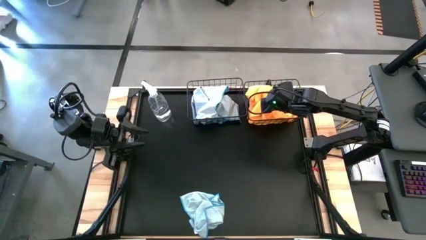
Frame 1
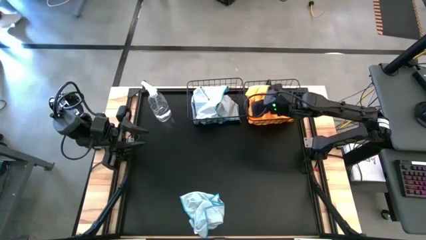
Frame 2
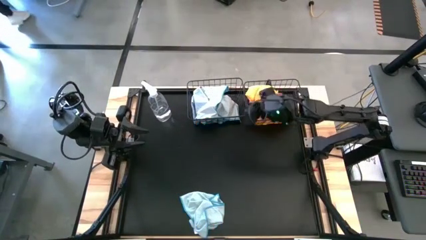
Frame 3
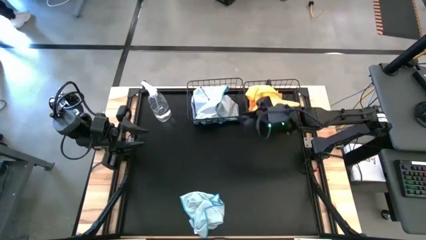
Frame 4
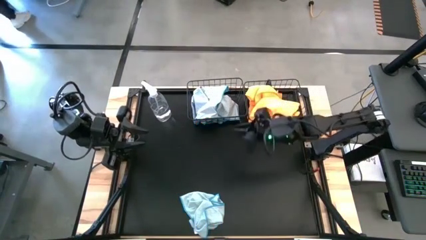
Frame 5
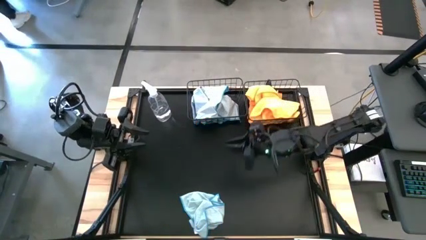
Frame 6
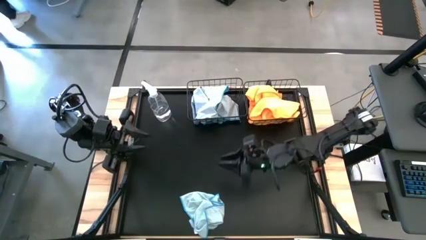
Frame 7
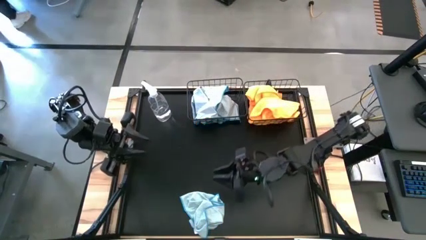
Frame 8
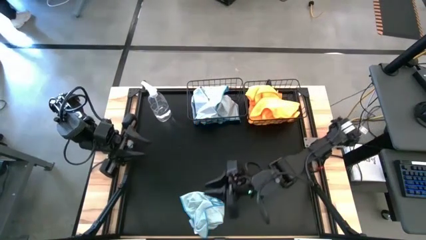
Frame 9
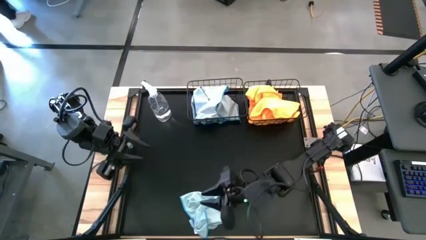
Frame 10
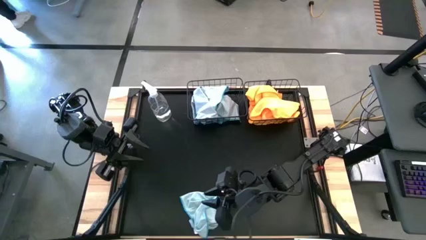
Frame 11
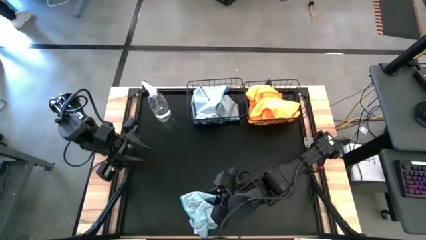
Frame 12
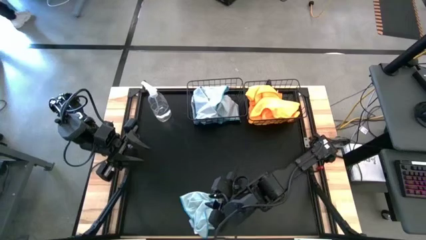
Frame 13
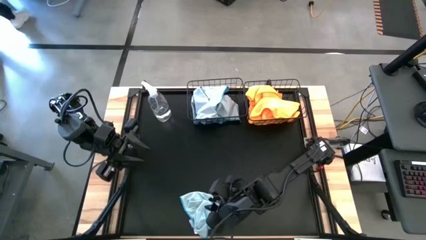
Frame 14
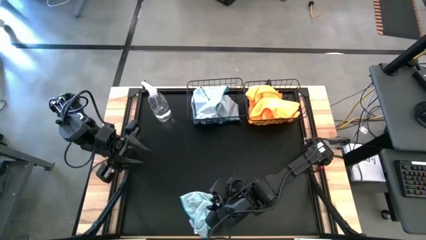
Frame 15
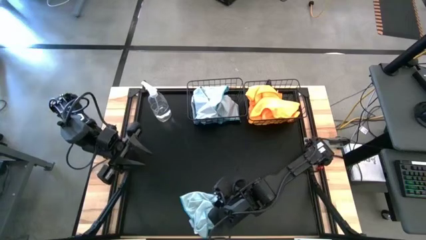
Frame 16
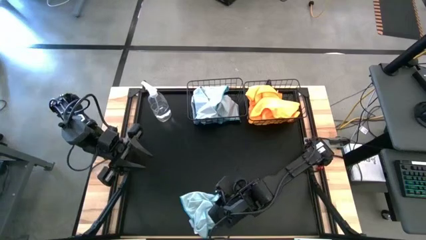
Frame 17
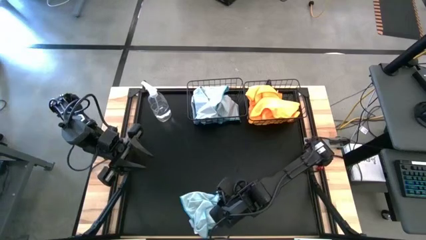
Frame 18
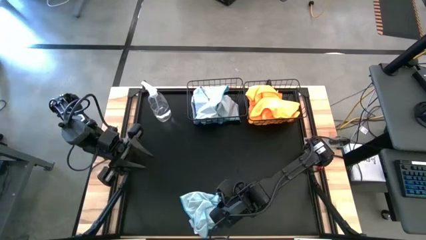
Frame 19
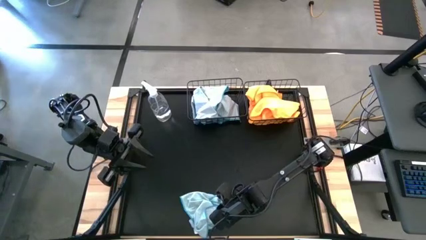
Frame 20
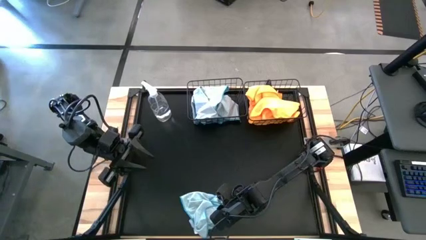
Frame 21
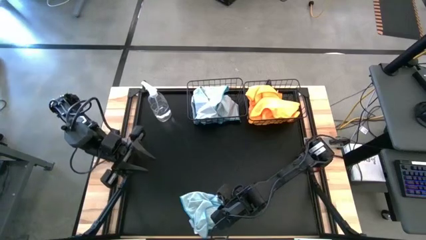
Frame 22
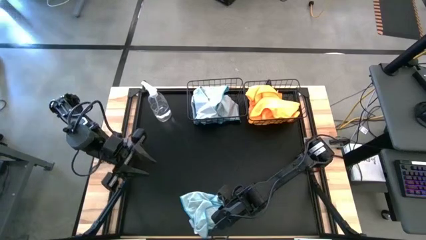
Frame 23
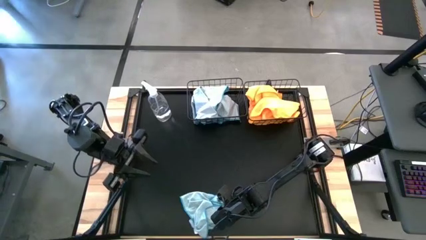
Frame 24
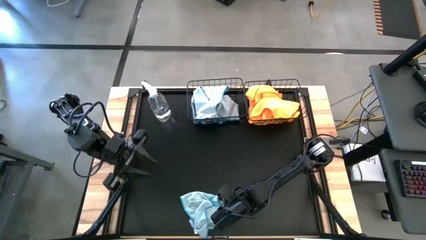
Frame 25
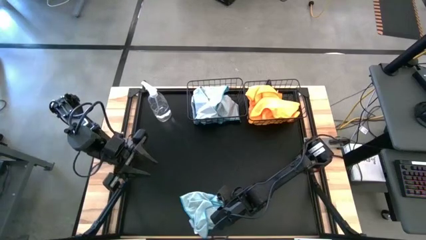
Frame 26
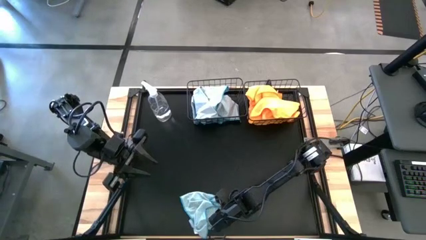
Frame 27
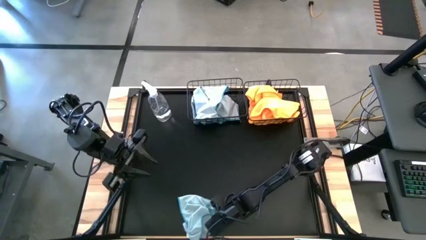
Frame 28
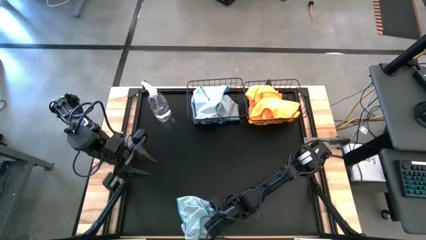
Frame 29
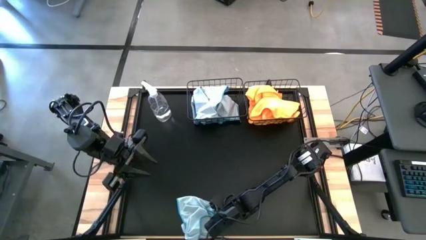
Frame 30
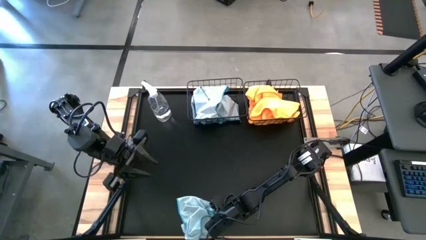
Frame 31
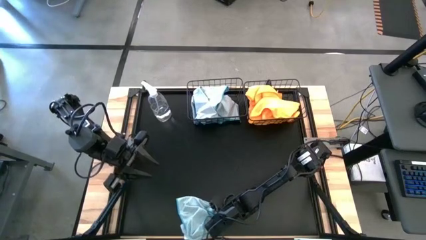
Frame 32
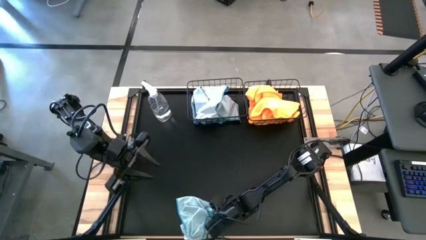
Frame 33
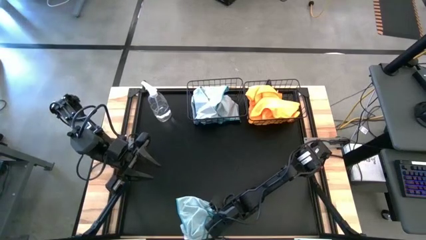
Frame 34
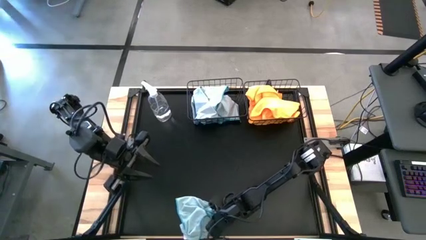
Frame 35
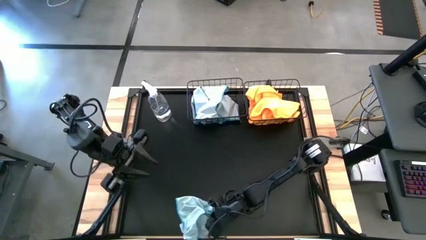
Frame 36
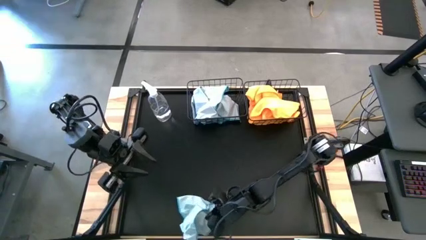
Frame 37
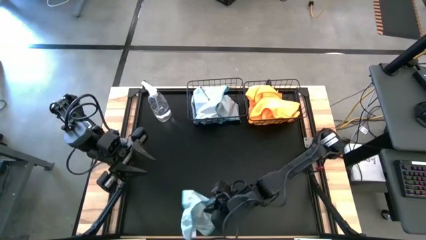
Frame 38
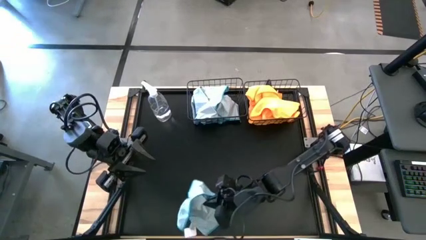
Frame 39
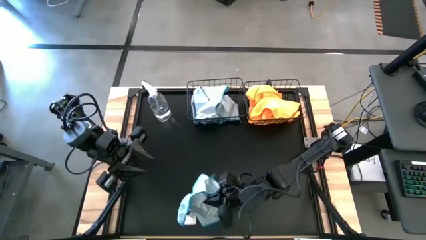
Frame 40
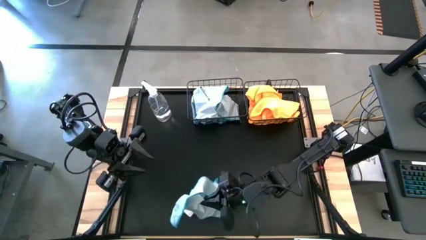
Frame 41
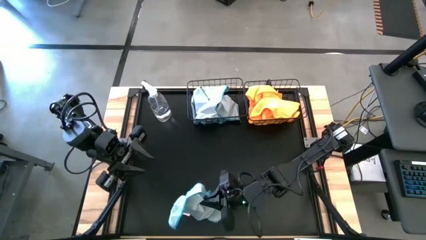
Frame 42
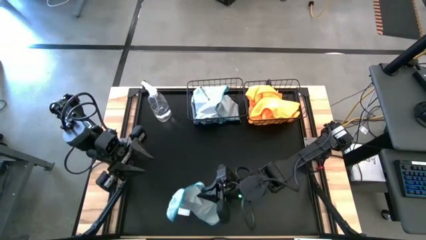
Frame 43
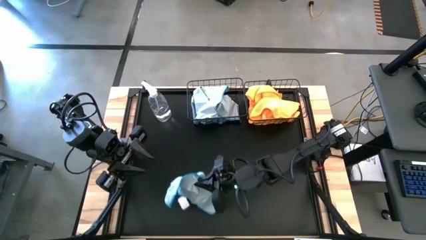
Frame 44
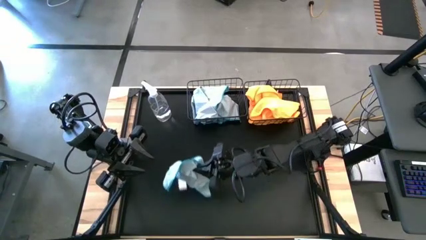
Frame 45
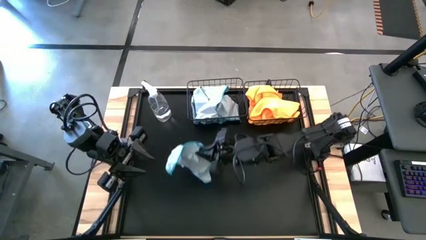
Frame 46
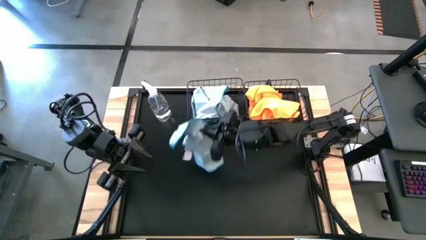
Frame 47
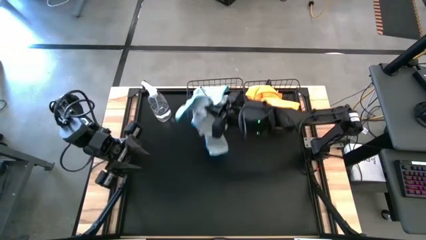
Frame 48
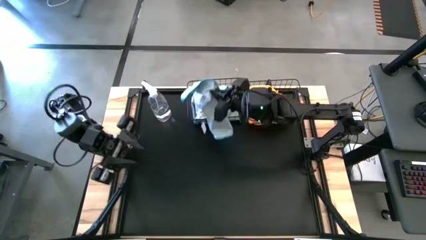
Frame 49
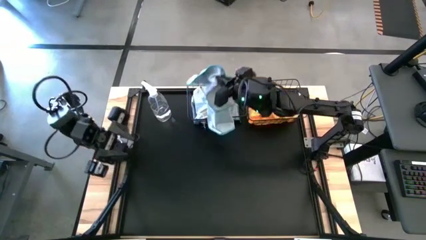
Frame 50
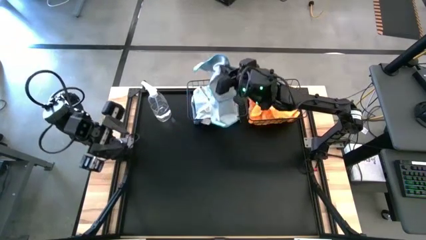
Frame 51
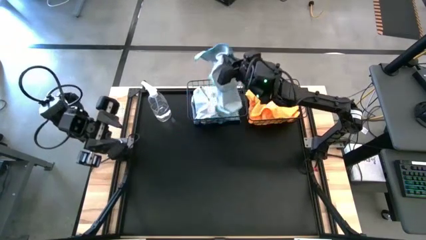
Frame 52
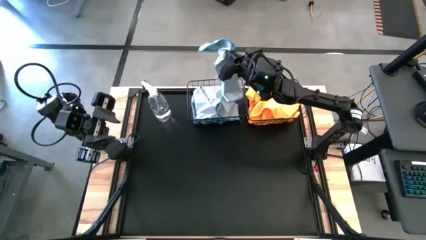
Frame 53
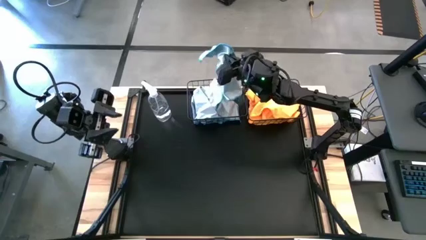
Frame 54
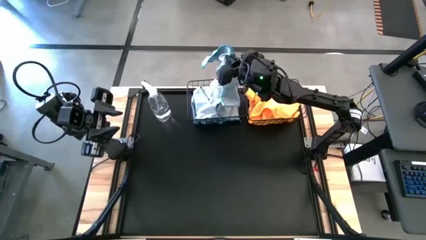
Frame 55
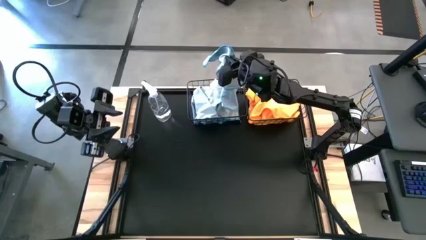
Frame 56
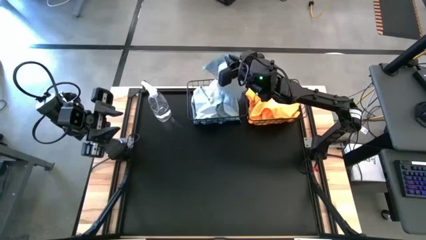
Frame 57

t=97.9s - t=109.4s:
Task: Sort microfiber towel by color & place in baskets
Put the blue microfiber towel into the left black wire basket

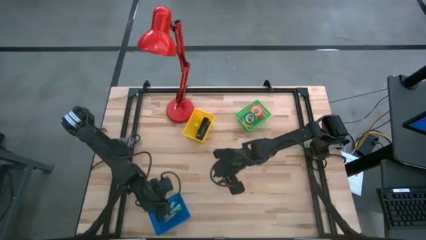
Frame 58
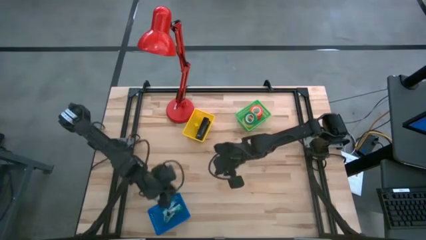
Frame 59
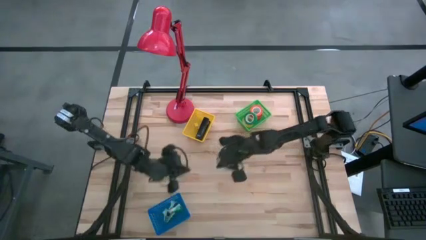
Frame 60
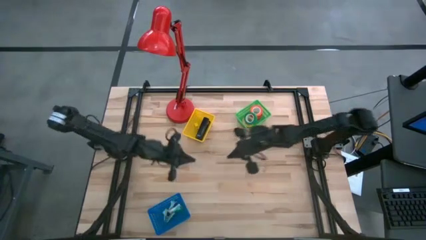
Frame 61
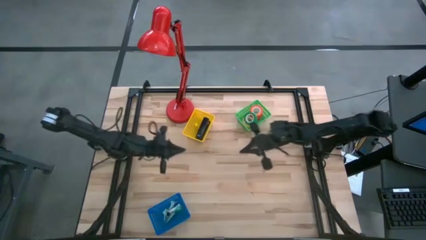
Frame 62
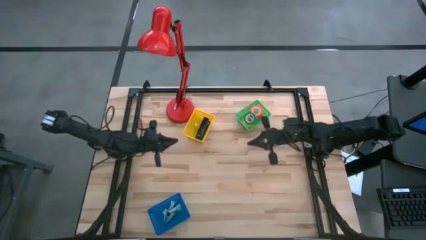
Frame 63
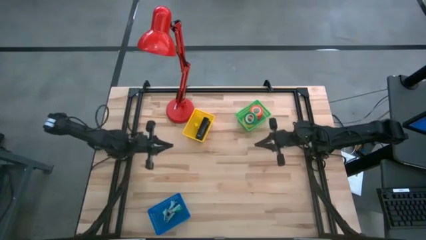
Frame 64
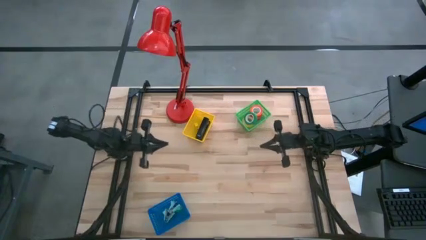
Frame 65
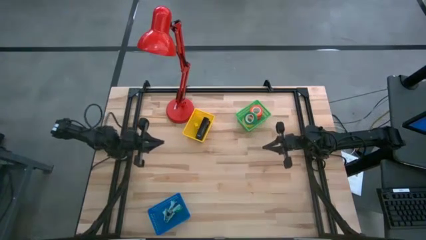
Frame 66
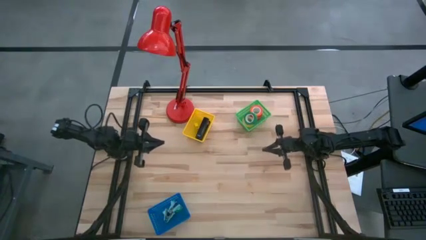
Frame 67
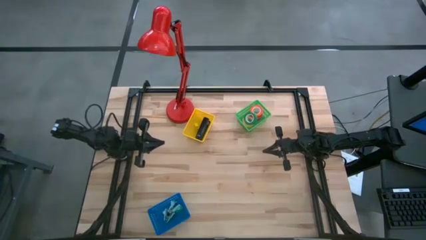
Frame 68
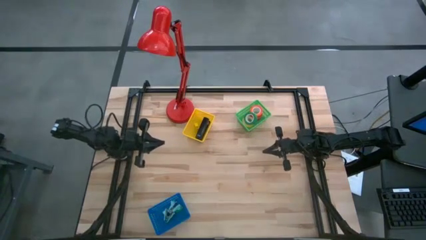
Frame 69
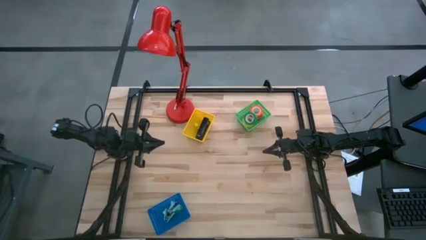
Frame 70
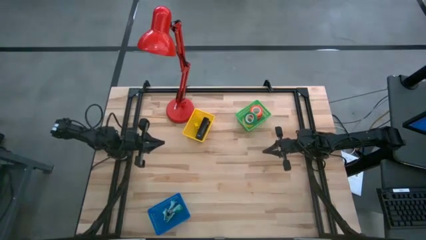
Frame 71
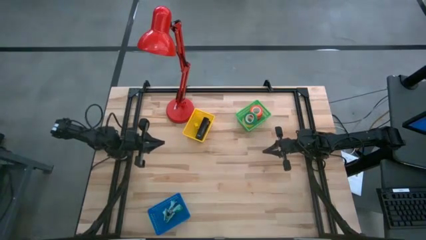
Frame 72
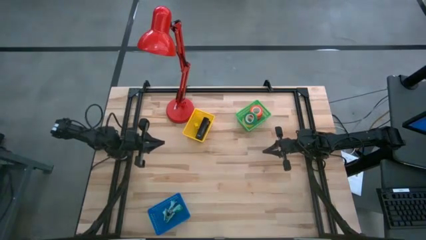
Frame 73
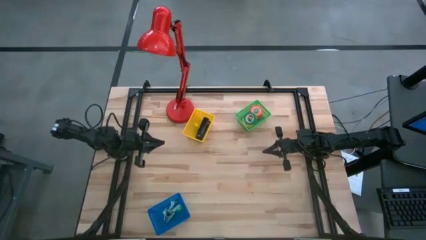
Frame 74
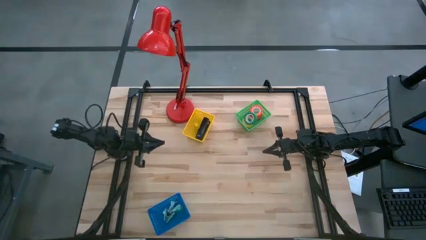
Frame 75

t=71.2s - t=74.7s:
Task: Pick and place Stapler, Stapler remover, tape
Return to Home Position
